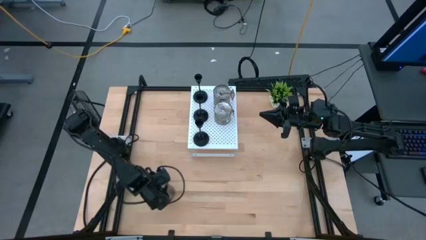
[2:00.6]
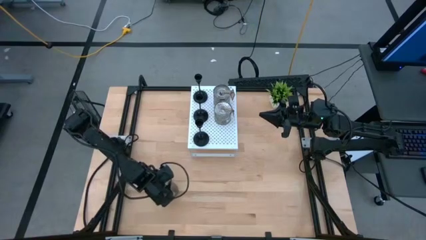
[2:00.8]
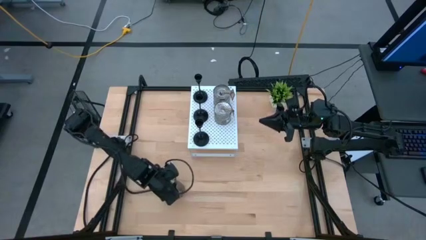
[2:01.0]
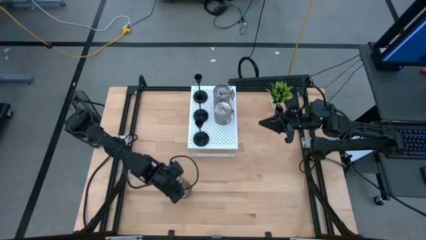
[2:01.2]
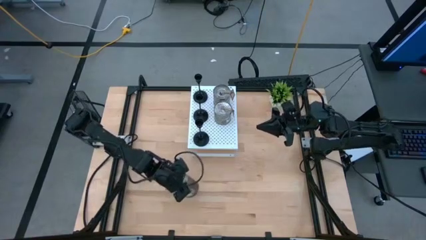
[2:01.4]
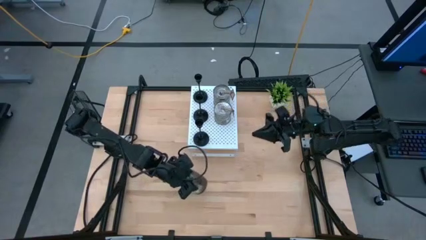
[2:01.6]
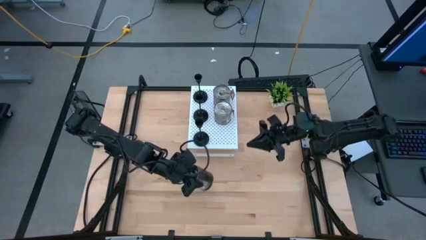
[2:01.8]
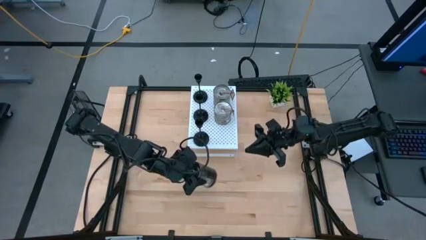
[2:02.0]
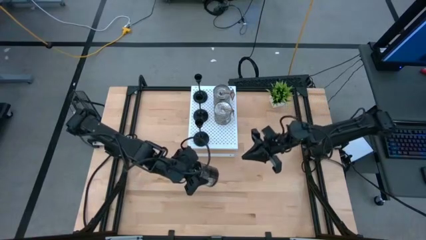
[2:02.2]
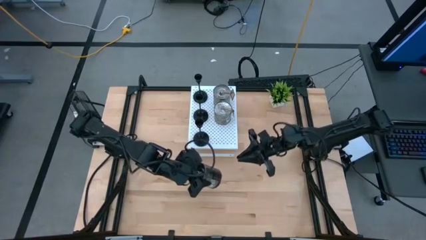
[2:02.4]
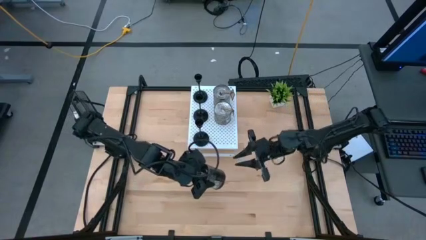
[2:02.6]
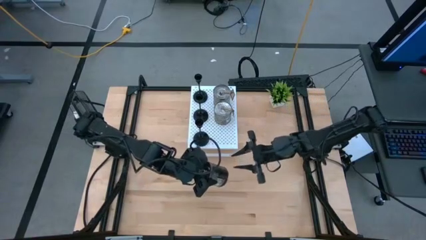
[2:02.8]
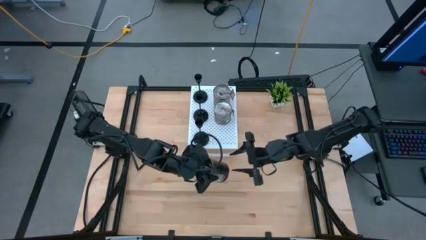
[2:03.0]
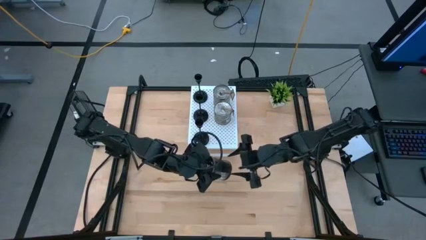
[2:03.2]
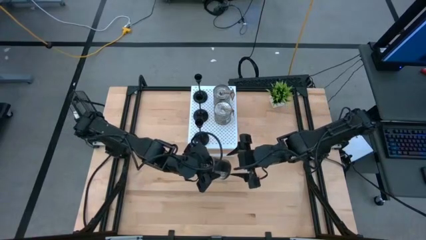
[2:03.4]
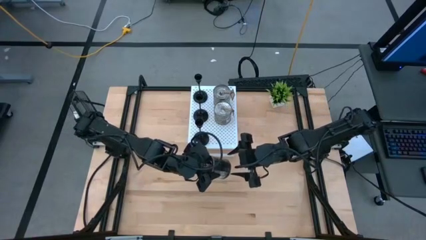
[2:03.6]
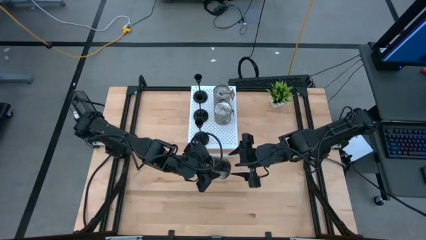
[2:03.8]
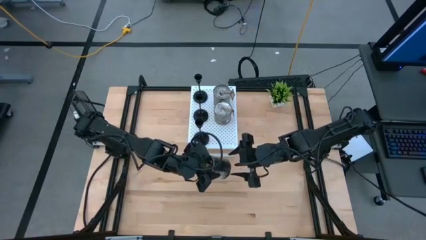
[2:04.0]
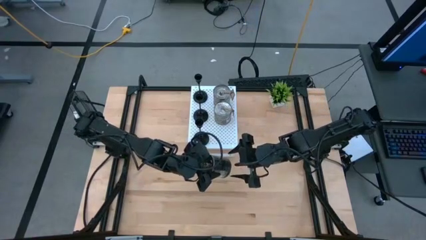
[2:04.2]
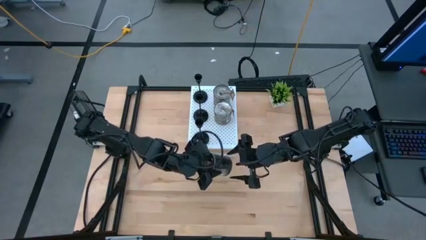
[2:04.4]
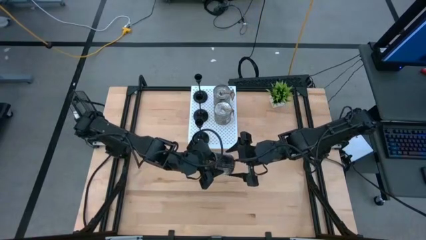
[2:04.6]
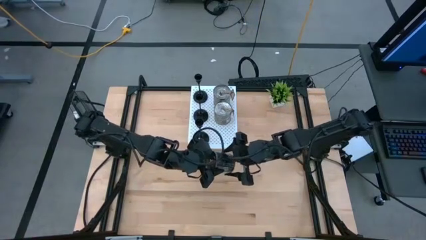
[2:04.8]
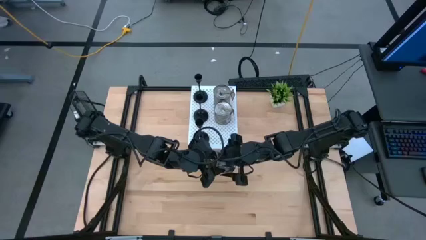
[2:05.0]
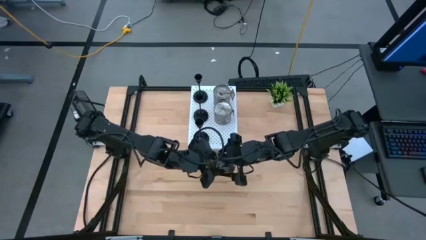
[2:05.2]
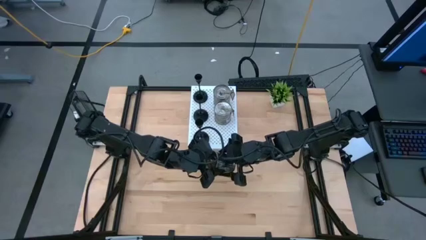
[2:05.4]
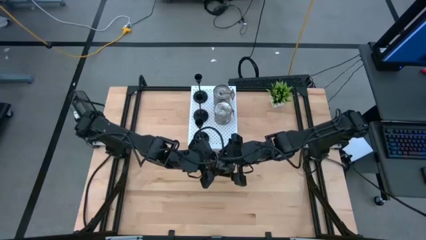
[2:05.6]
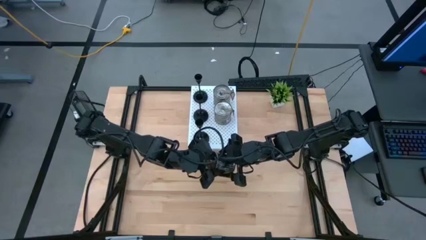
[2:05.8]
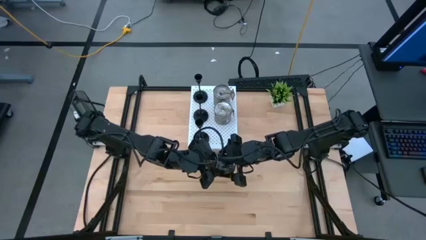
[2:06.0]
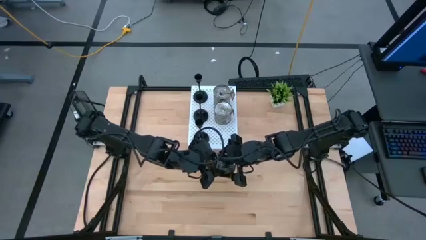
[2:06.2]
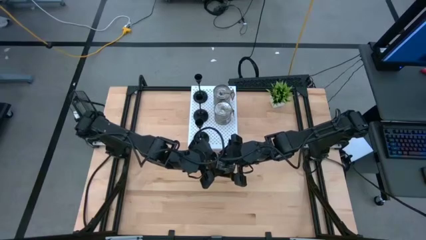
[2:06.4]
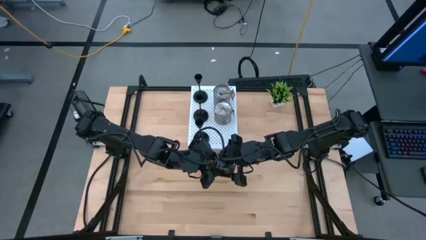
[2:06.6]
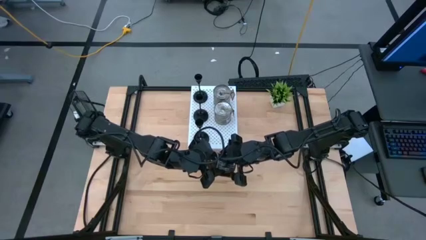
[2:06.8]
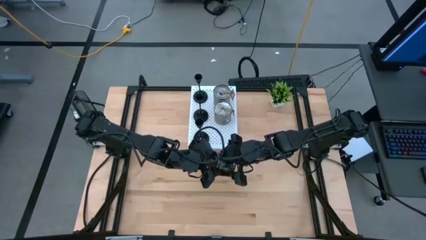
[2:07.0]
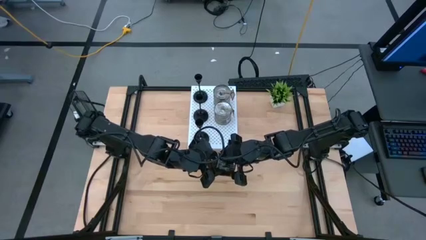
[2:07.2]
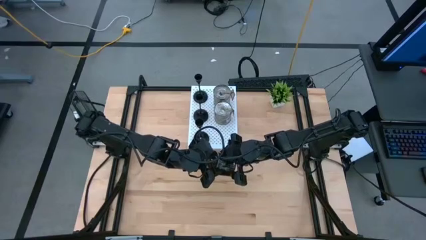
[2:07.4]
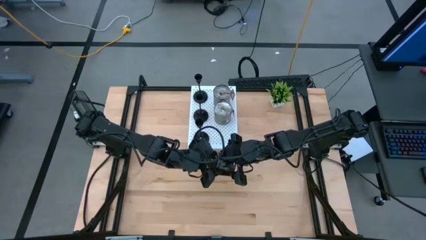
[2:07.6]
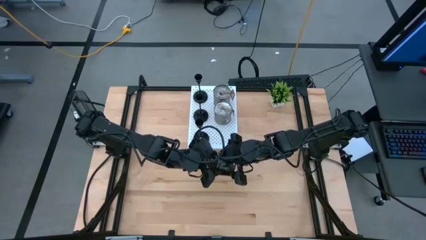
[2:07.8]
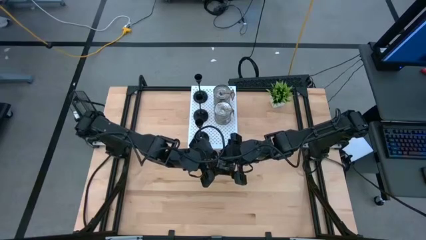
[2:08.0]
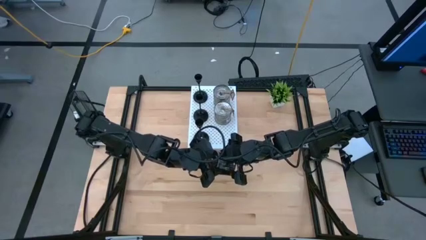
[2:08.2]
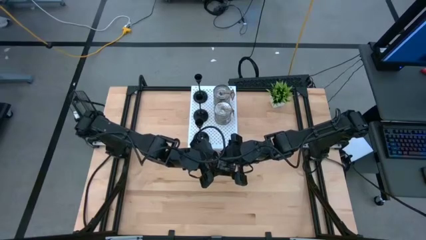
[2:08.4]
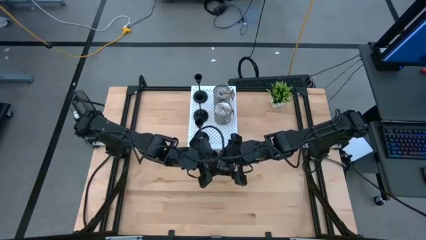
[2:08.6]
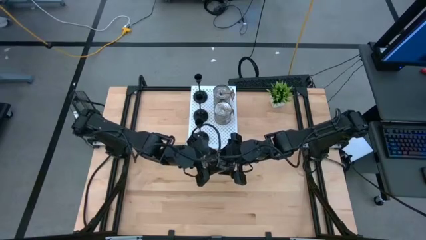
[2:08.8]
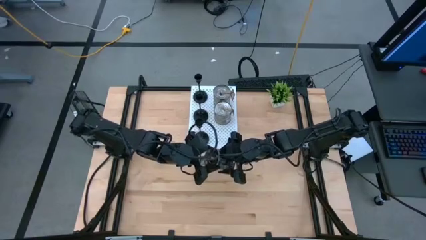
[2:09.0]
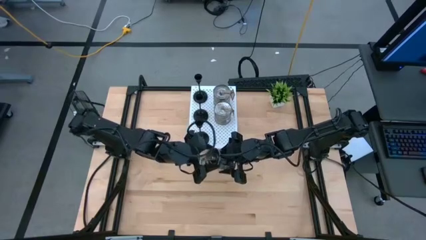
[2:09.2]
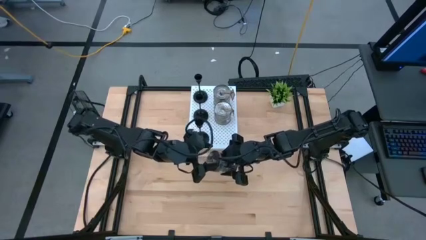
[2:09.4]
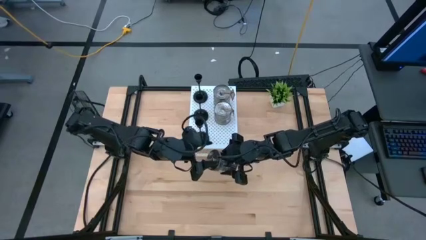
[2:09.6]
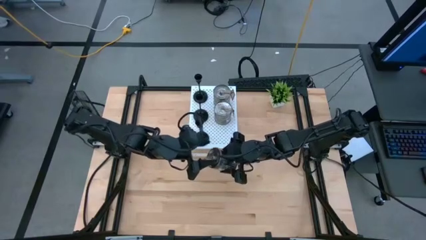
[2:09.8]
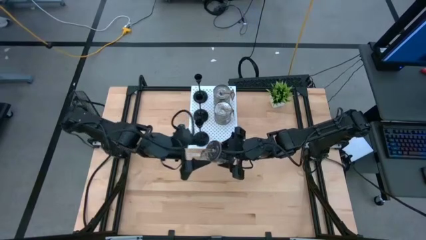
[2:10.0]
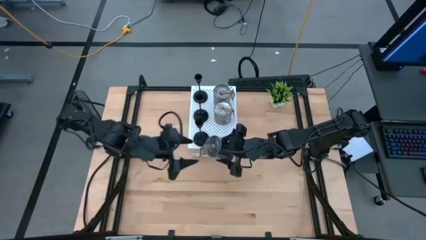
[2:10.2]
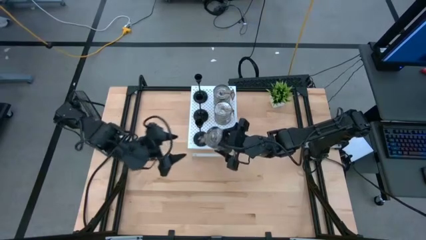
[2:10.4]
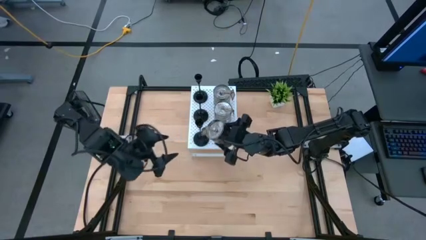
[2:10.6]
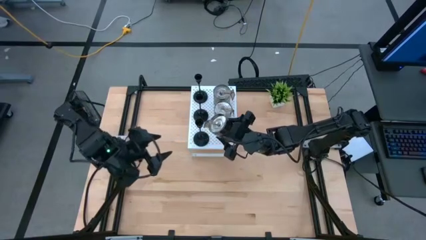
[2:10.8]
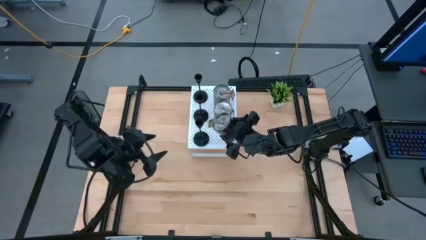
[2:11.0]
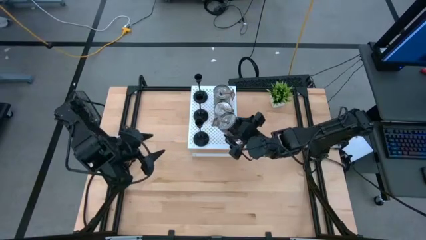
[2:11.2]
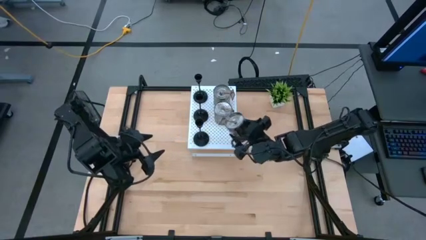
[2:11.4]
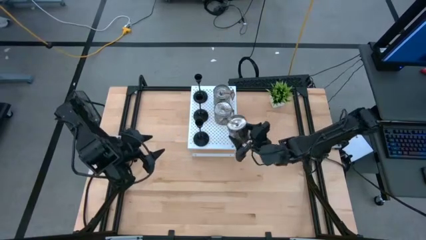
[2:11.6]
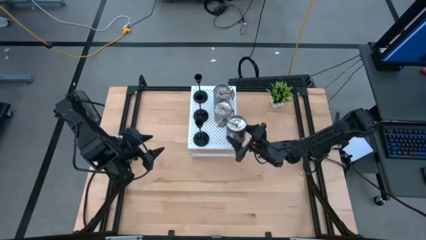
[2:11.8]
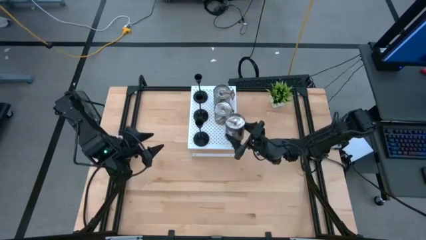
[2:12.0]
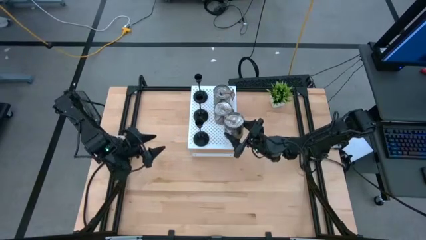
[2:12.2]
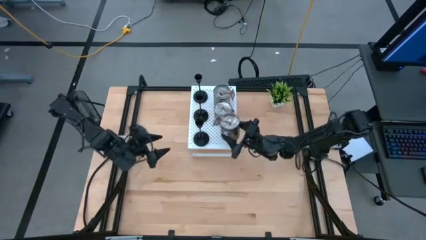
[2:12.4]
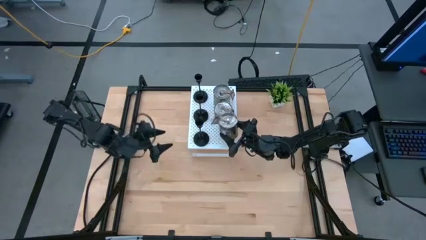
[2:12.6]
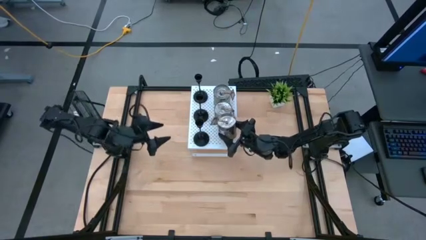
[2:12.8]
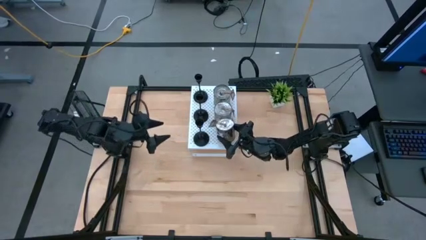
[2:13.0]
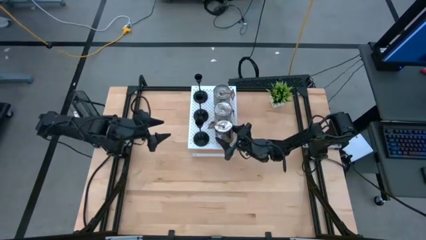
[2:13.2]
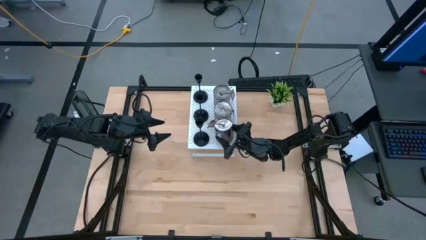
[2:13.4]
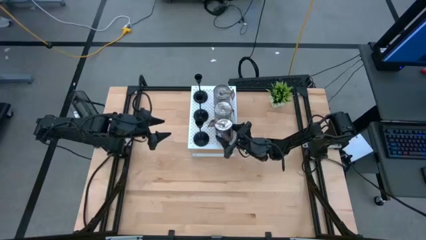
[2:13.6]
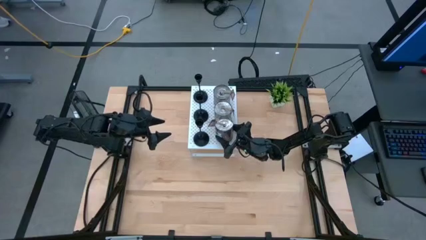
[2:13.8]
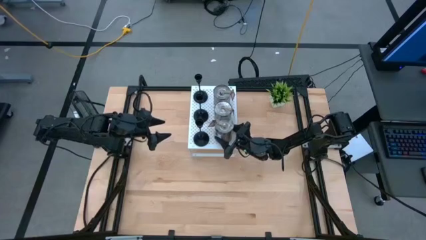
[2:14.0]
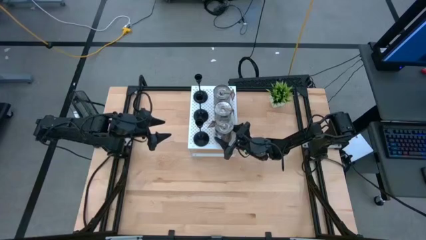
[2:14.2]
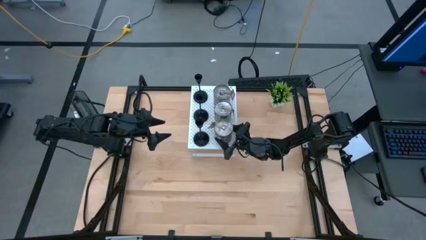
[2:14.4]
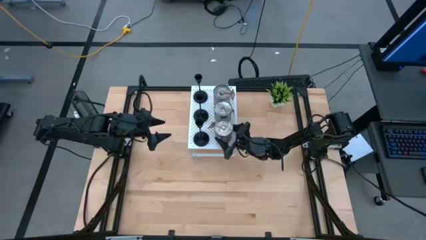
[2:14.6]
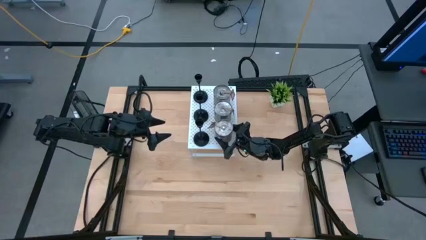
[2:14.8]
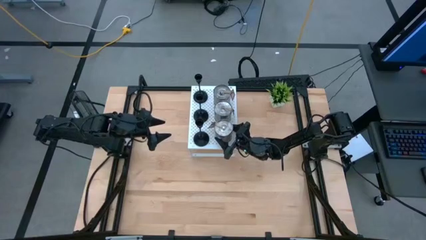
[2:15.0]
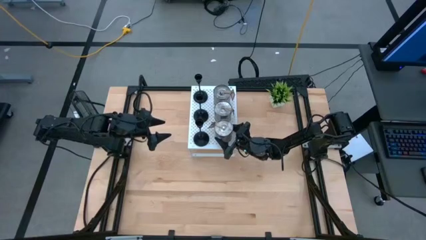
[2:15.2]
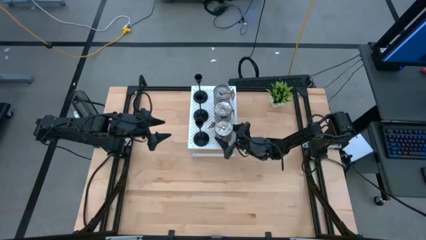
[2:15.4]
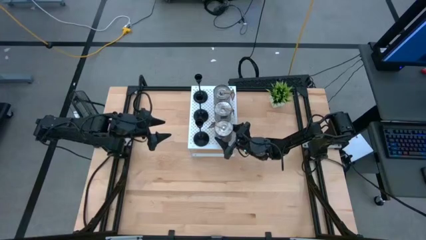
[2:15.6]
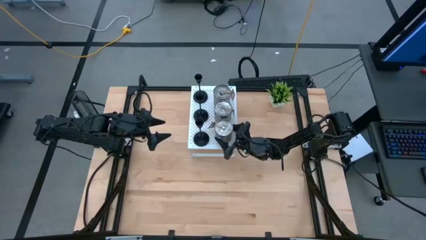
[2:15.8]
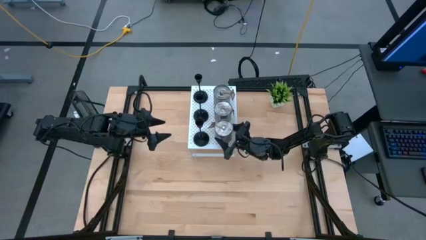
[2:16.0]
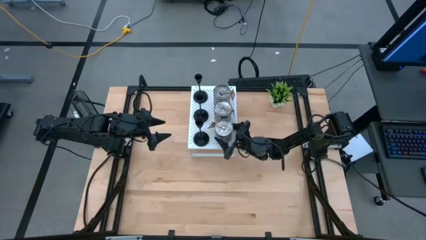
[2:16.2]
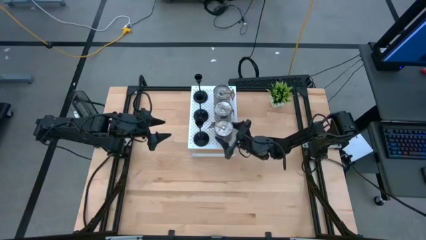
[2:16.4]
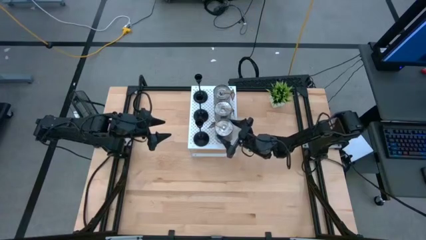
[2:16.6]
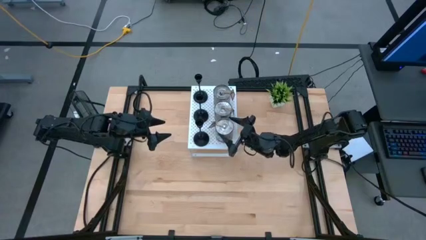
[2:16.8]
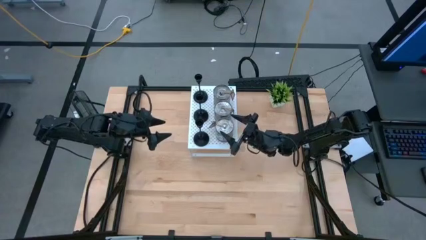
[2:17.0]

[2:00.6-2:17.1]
Task: Pick & Place candle stick holders
Put the silver scented candle on the shelf aligned with the other silver scented candle
